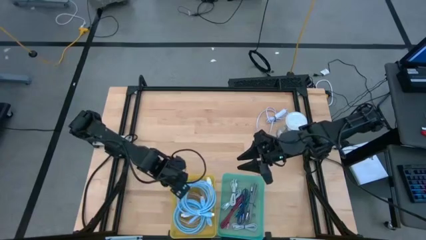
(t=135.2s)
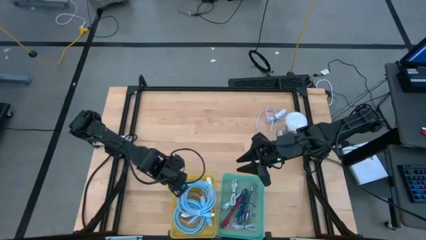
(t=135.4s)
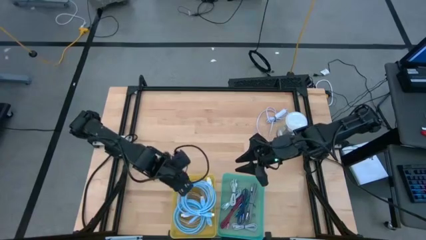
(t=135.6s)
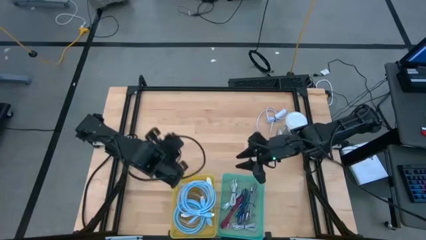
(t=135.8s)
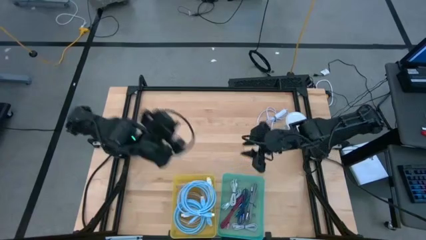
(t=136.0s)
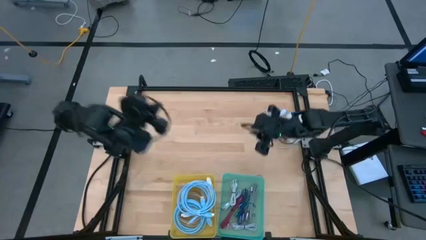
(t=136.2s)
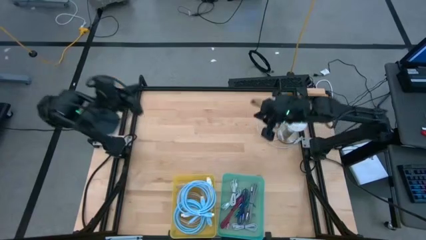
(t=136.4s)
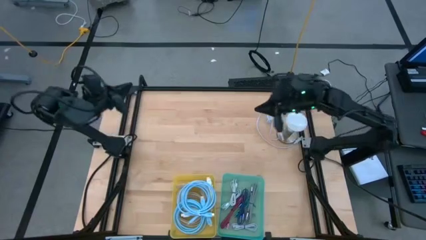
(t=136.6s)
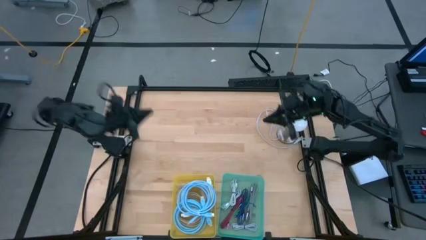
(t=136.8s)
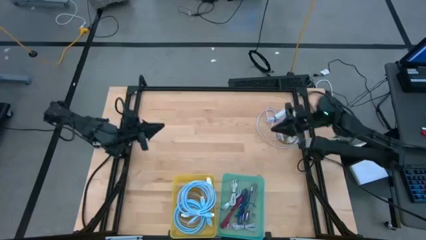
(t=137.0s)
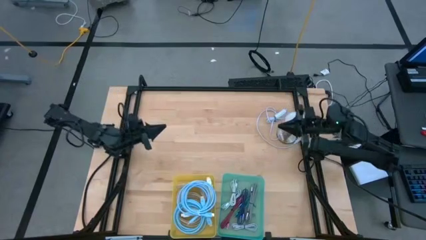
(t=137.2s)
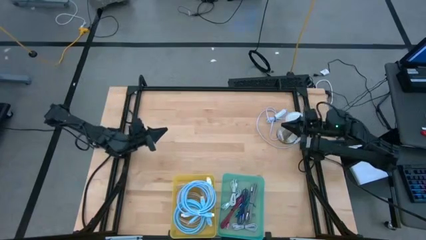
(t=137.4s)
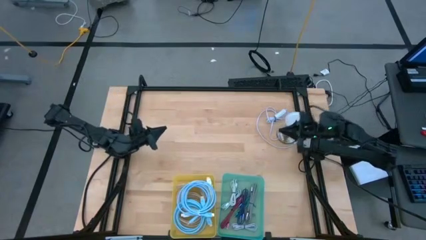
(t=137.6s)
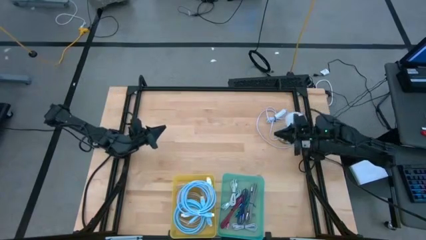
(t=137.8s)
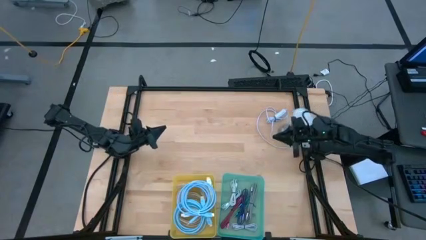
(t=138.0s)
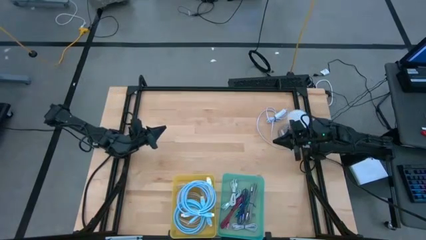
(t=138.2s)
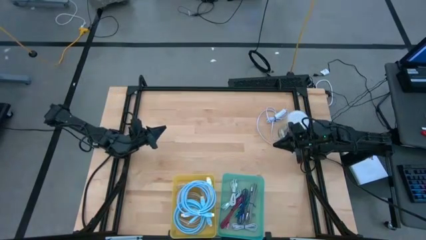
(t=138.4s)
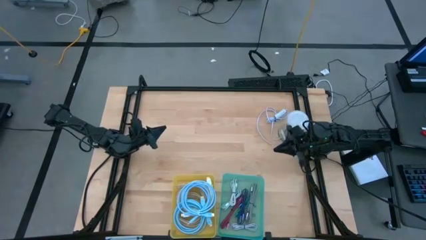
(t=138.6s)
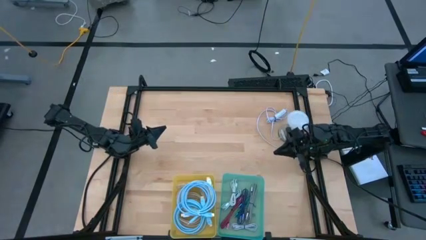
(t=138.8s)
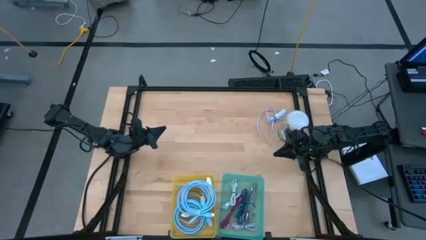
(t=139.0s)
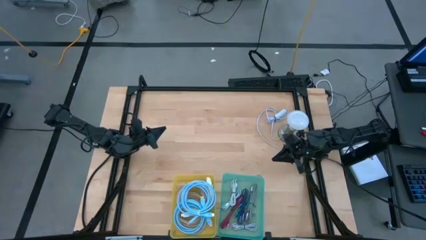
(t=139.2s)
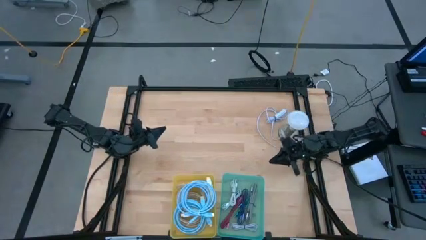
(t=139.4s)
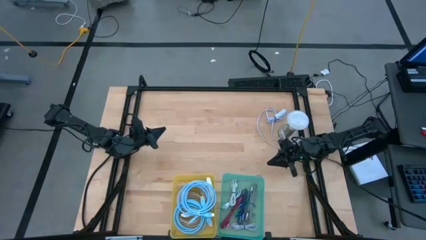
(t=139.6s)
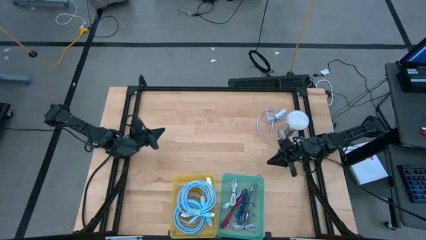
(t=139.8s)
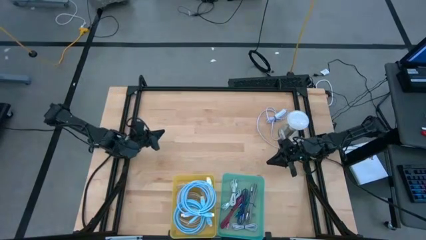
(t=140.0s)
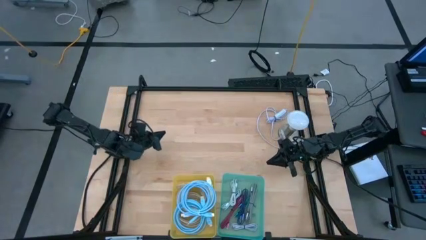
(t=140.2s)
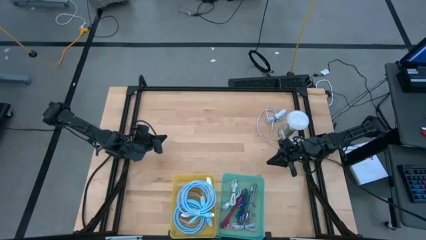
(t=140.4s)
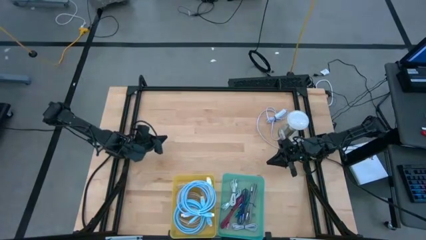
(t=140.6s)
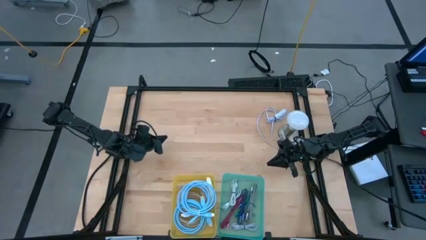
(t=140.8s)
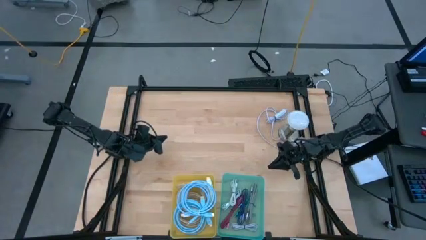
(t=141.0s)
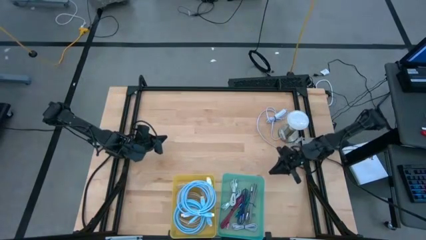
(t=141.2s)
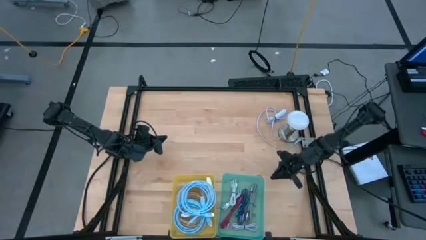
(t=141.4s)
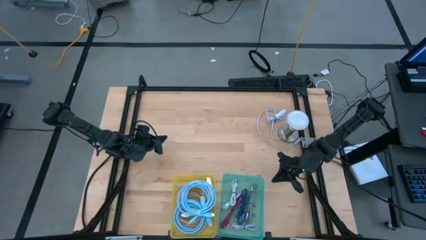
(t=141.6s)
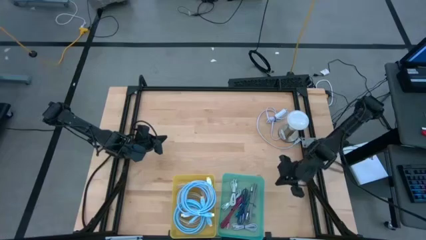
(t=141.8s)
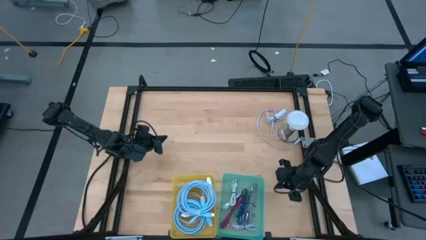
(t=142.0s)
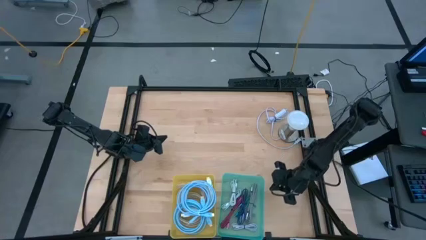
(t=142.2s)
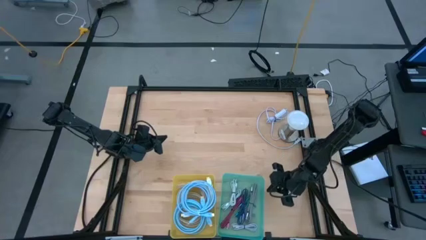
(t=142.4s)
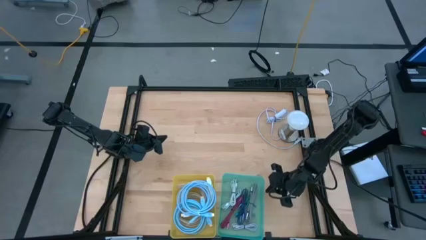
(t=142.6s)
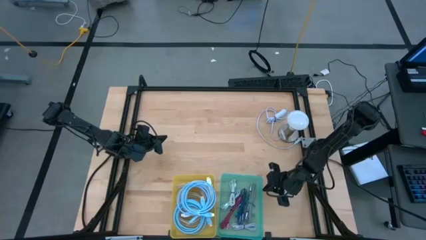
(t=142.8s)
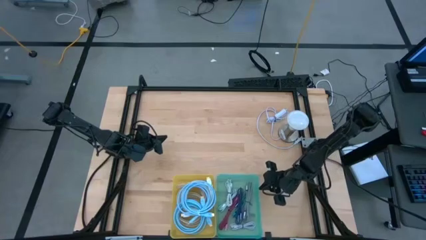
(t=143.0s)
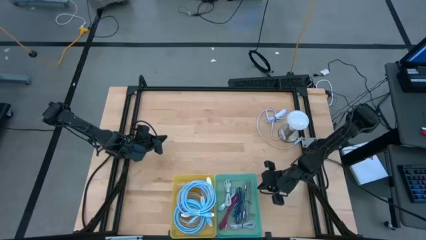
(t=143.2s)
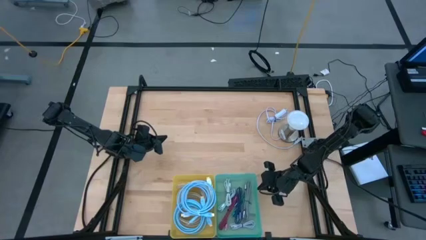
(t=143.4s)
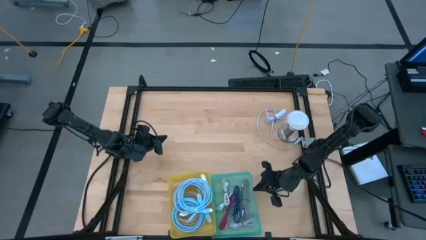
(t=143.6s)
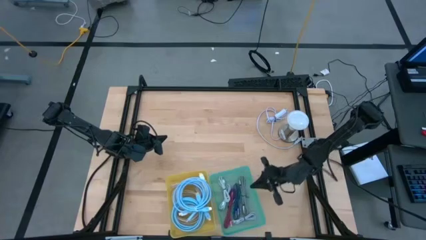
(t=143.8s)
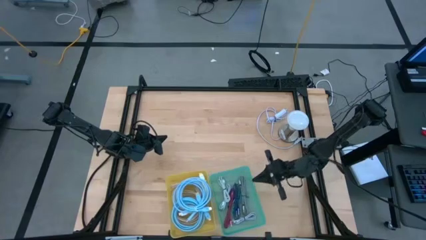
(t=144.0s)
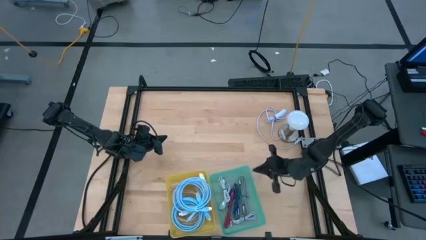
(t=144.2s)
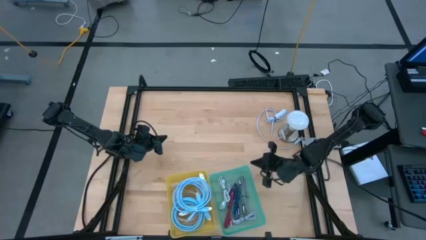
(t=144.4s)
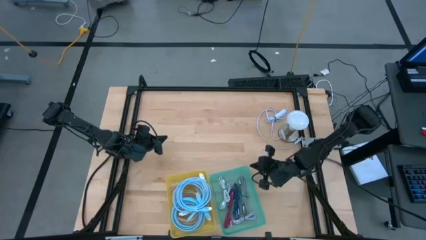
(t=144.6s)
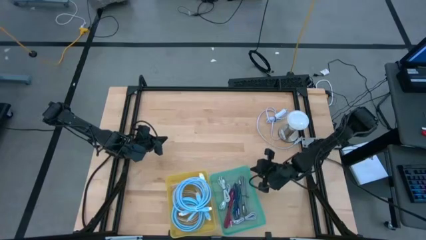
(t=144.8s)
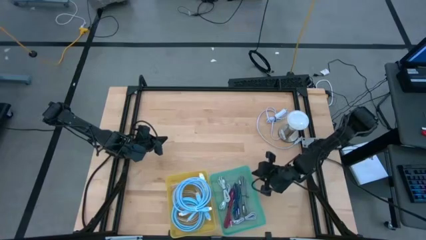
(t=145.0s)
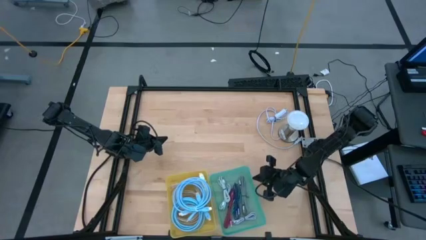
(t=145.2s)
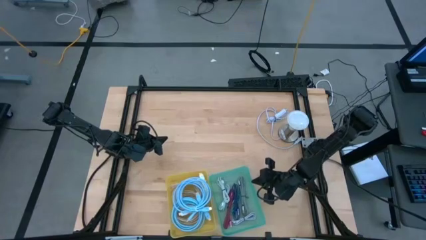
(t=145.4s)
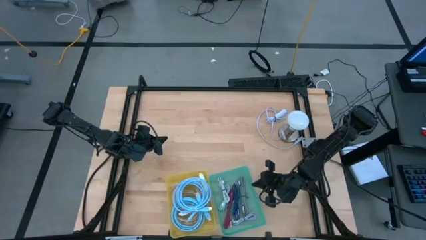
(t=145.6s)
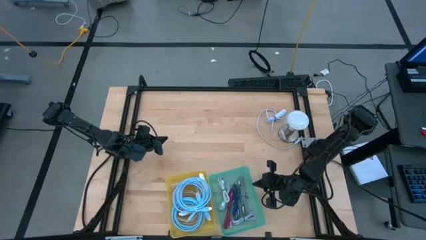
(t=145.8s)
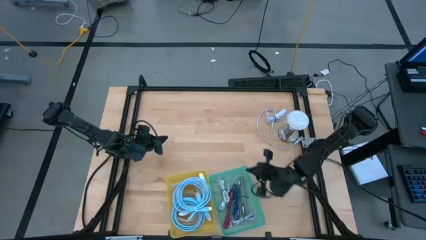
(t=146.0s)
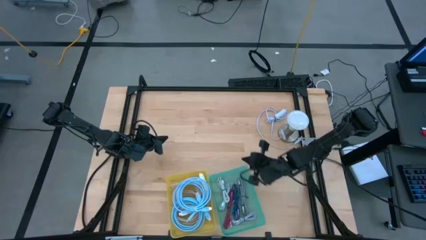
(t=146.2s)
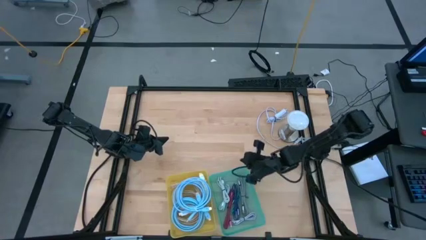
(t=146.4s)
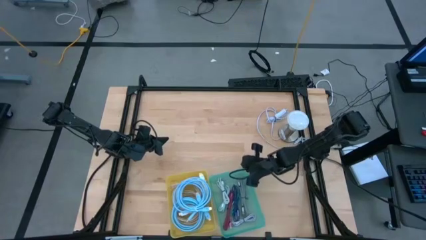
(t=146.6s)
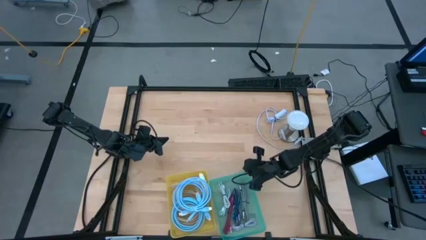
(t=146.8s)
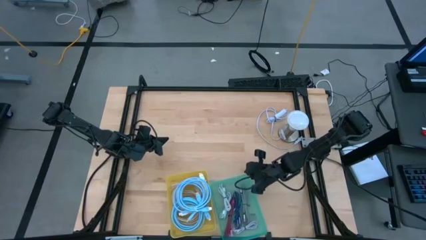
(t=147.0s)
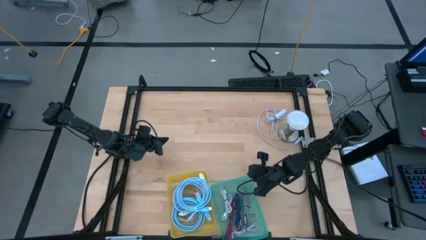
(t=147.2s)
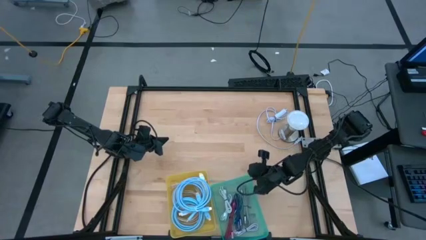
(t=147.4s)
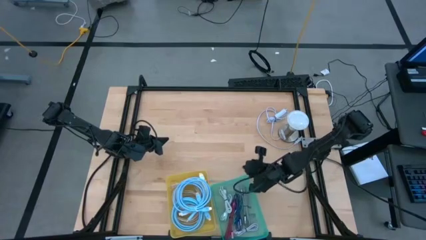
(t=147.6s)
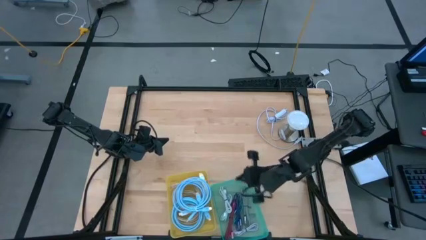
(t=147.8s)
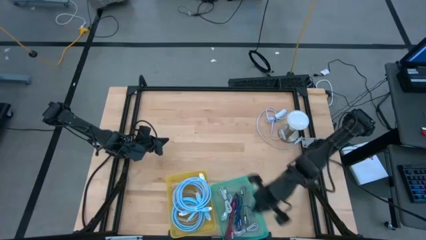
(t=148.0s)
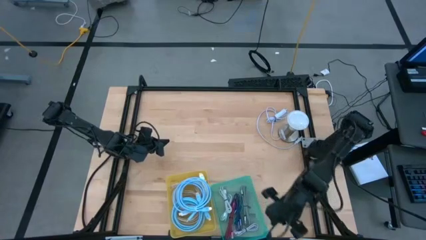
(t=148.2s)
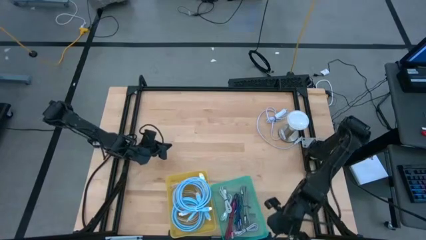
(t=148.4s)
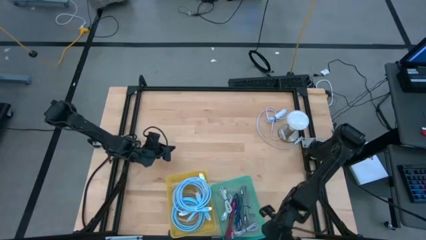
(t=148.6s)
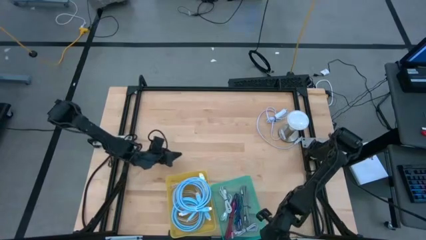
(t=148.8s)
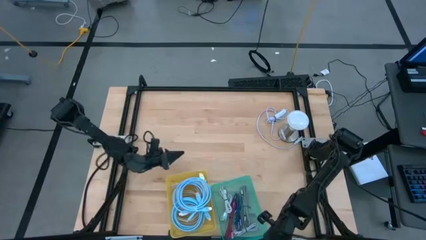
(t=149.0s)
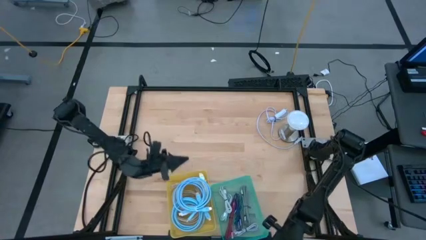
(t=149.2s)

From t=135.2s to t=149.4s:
Task: Pick & Place USB Port
Adjust the bins
